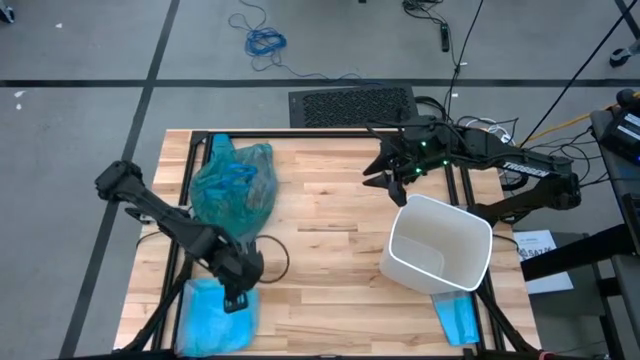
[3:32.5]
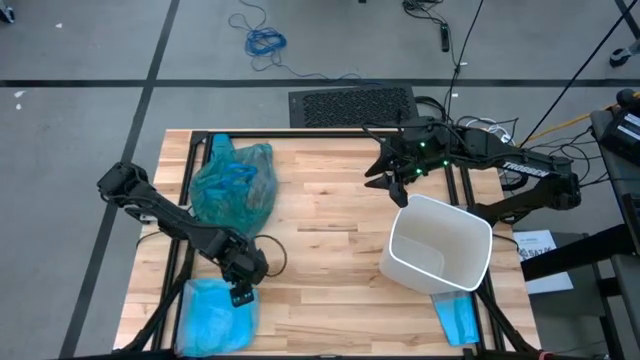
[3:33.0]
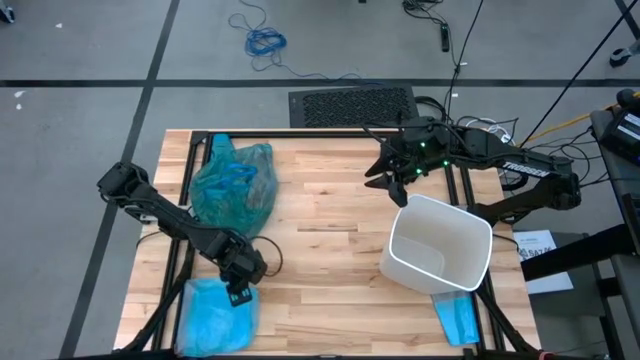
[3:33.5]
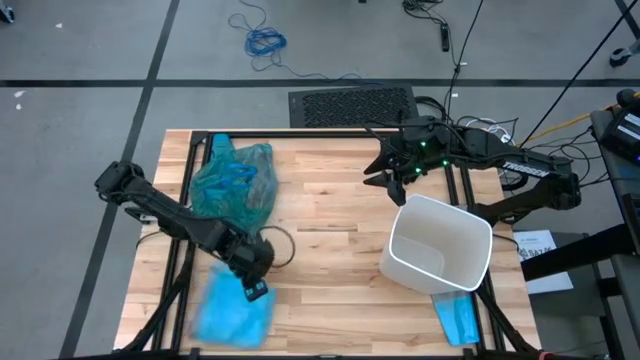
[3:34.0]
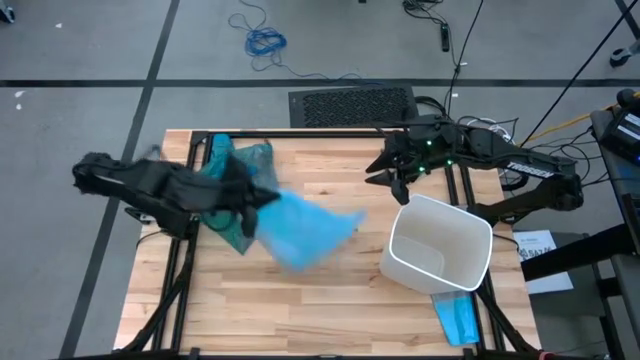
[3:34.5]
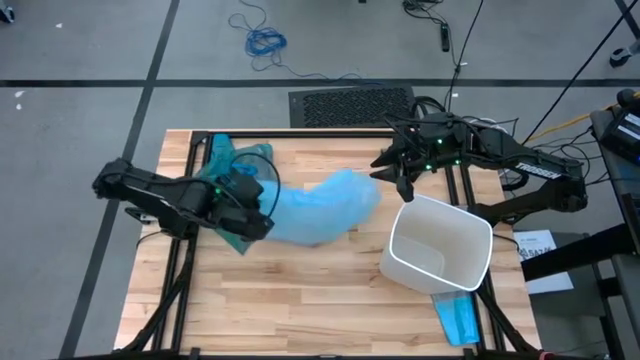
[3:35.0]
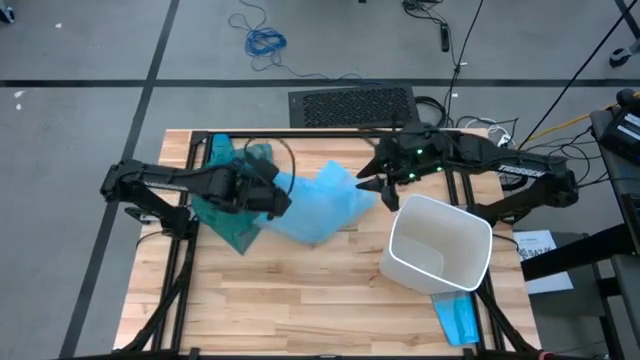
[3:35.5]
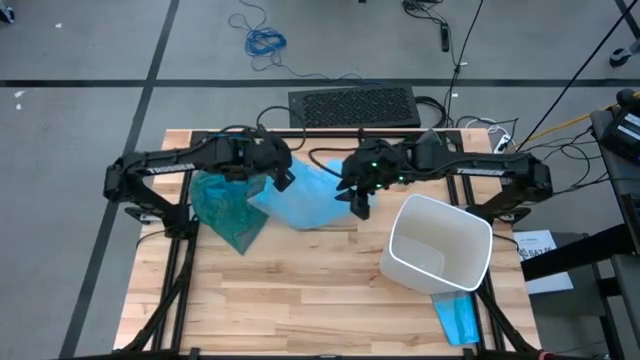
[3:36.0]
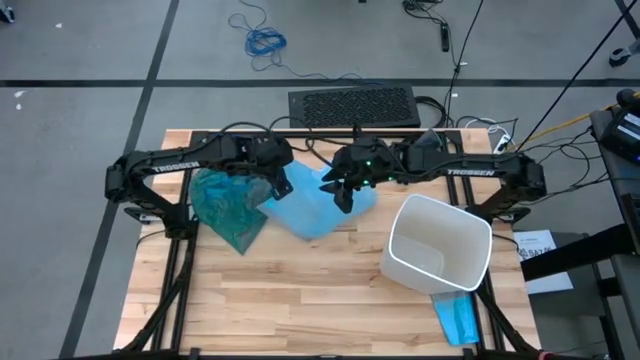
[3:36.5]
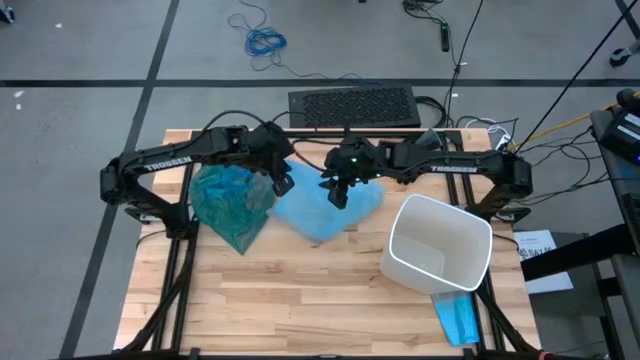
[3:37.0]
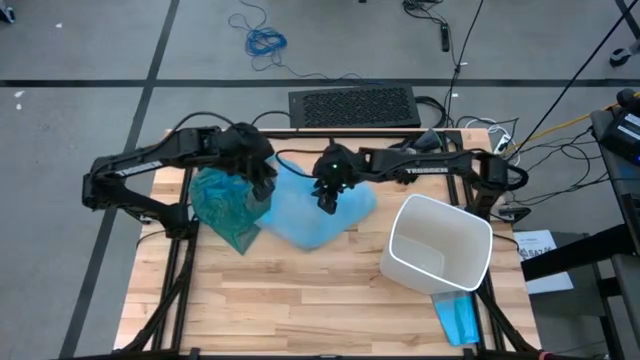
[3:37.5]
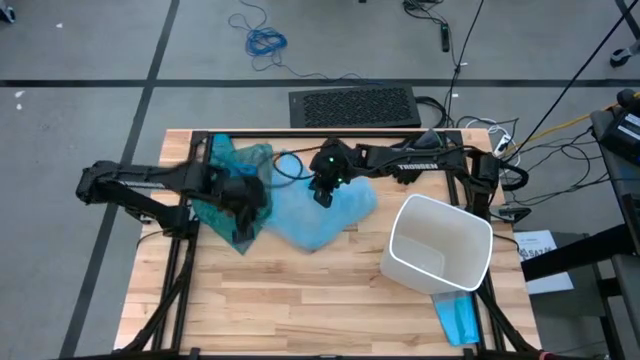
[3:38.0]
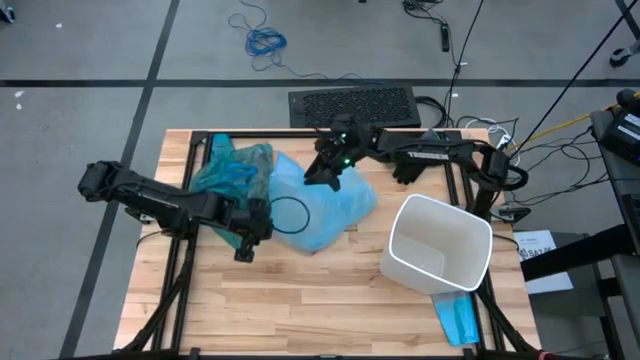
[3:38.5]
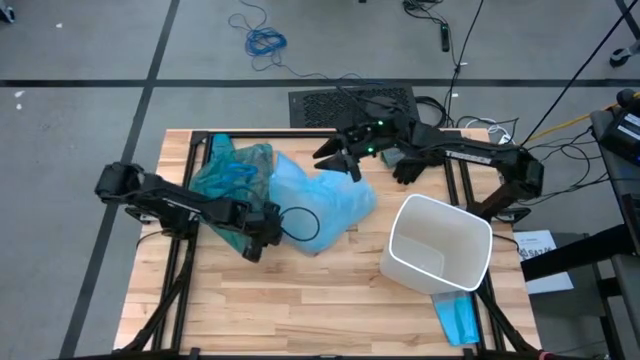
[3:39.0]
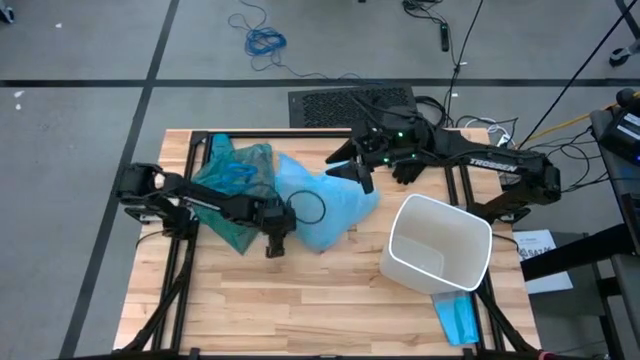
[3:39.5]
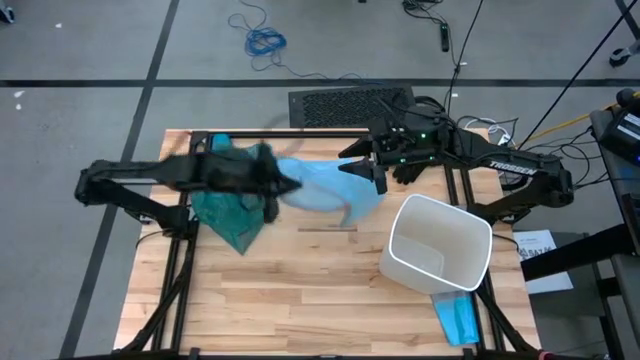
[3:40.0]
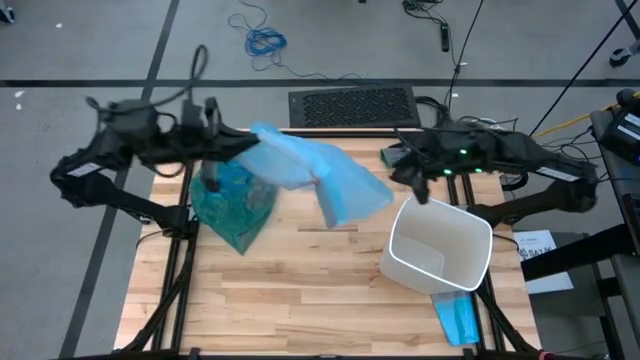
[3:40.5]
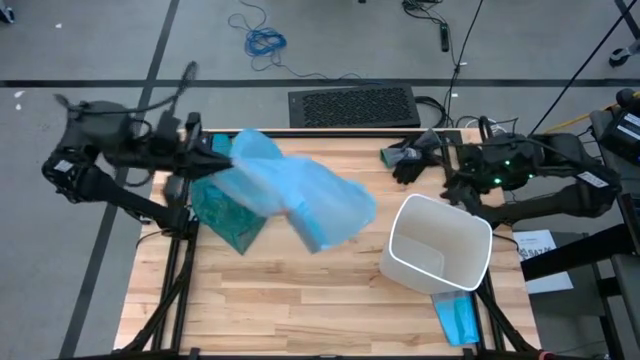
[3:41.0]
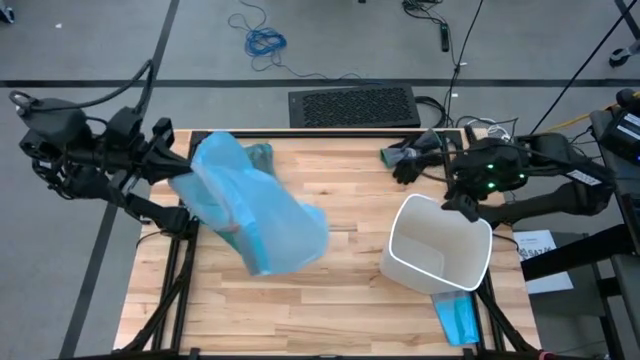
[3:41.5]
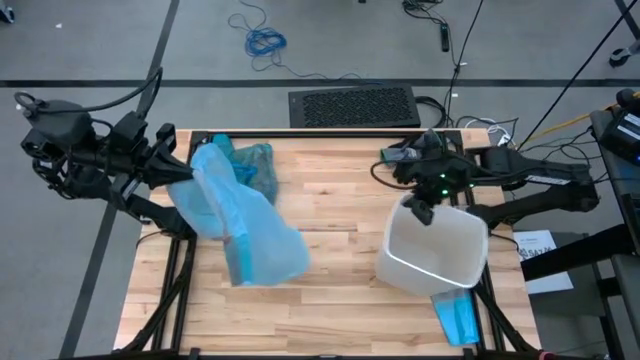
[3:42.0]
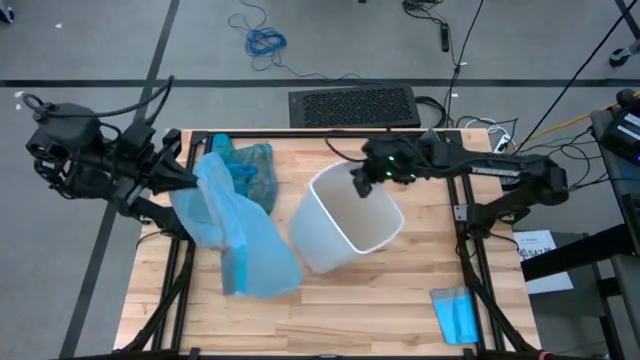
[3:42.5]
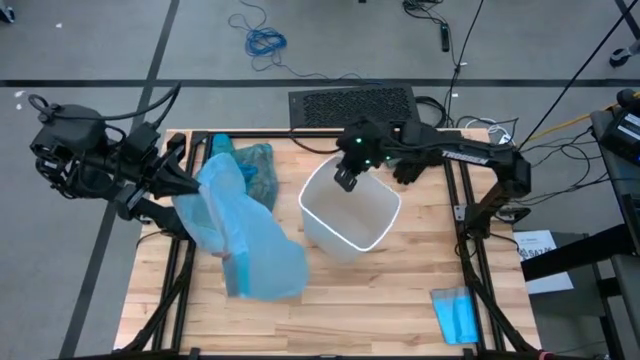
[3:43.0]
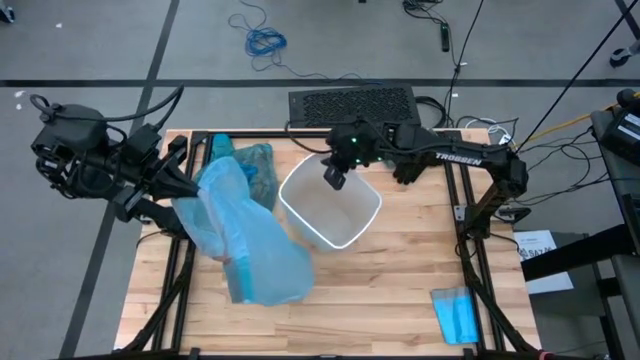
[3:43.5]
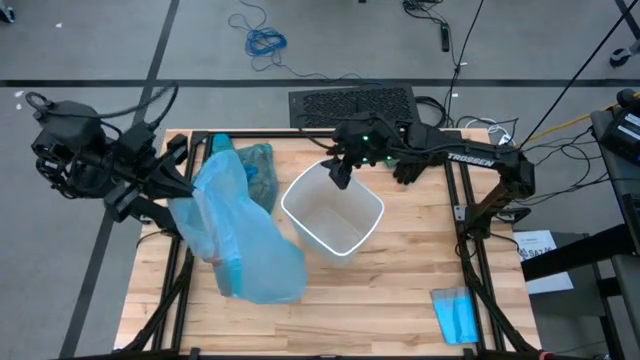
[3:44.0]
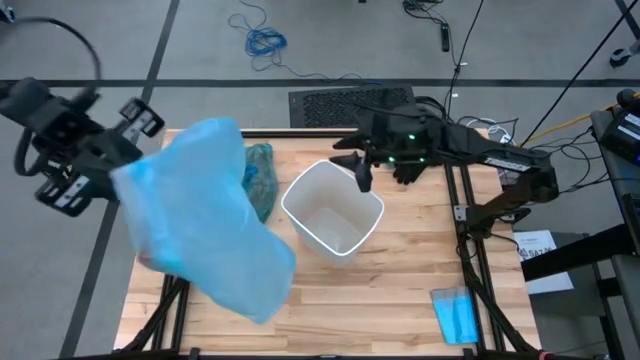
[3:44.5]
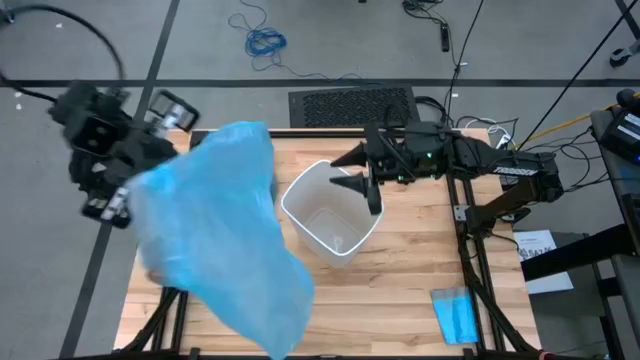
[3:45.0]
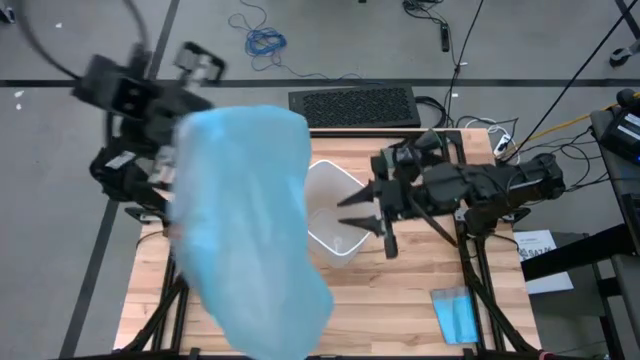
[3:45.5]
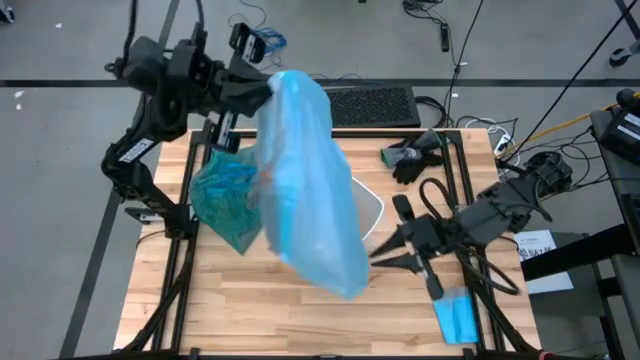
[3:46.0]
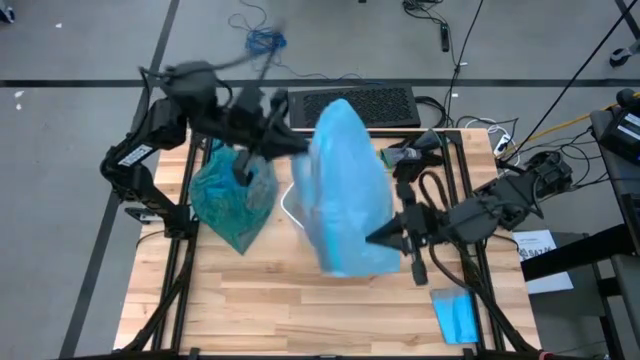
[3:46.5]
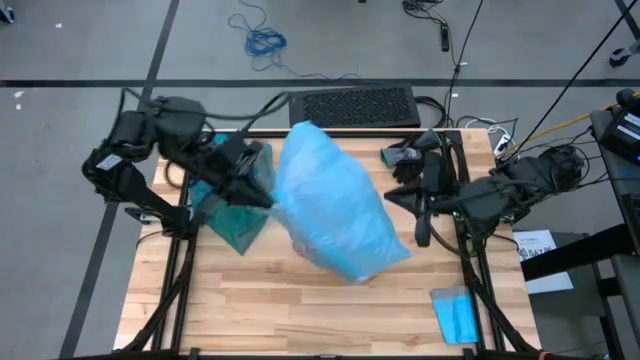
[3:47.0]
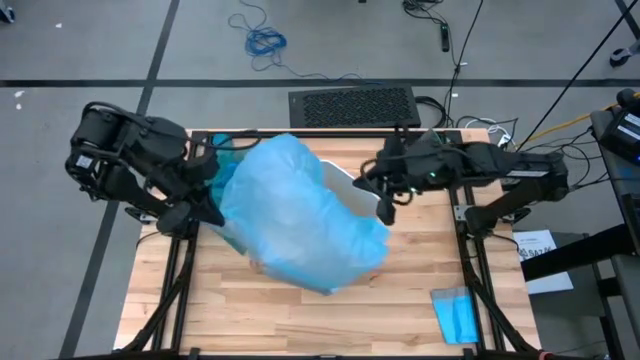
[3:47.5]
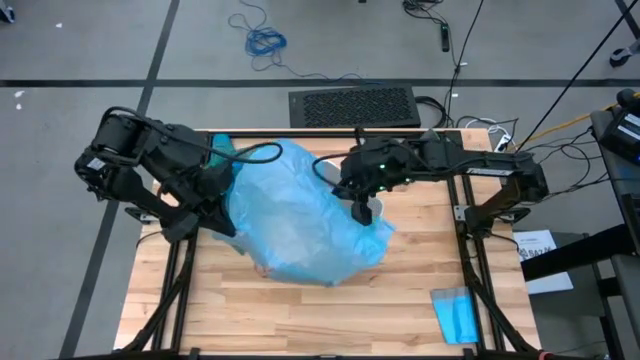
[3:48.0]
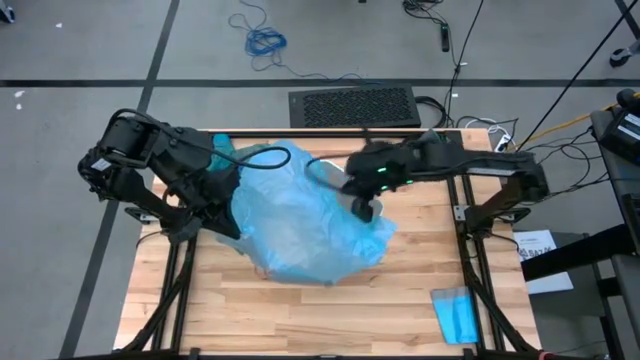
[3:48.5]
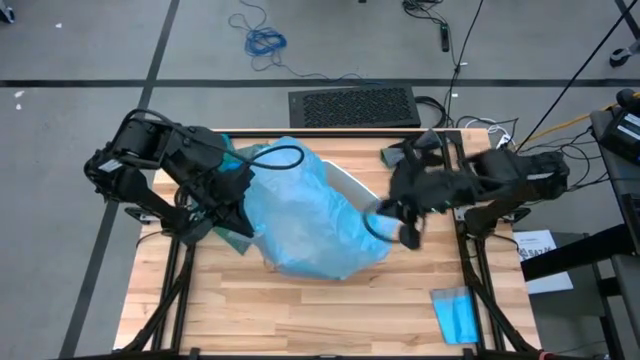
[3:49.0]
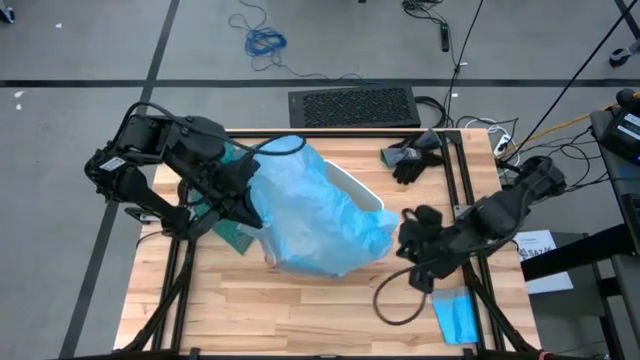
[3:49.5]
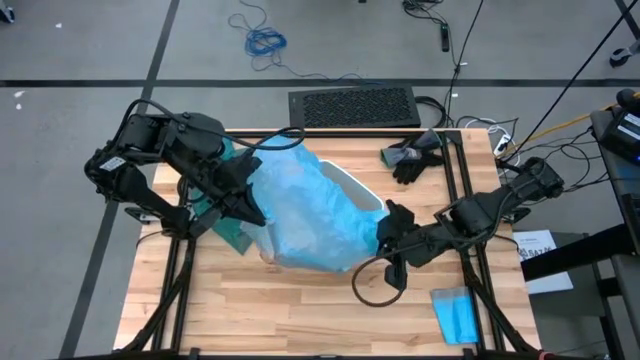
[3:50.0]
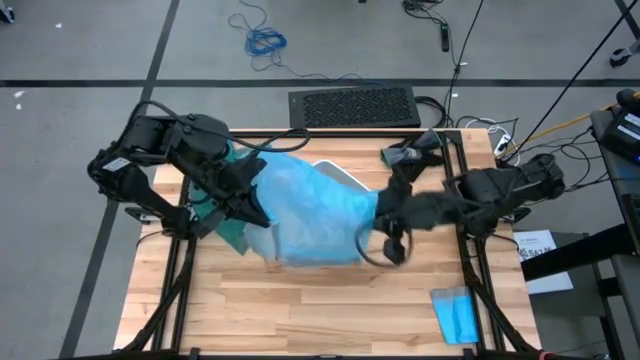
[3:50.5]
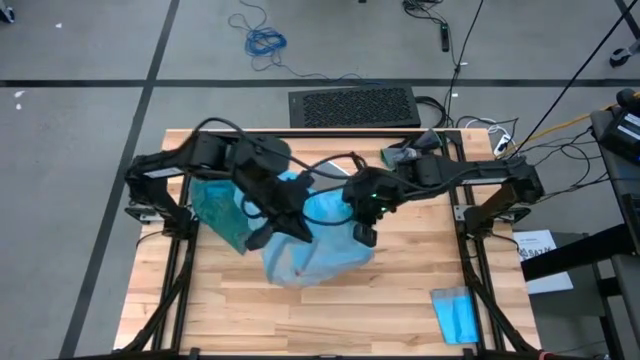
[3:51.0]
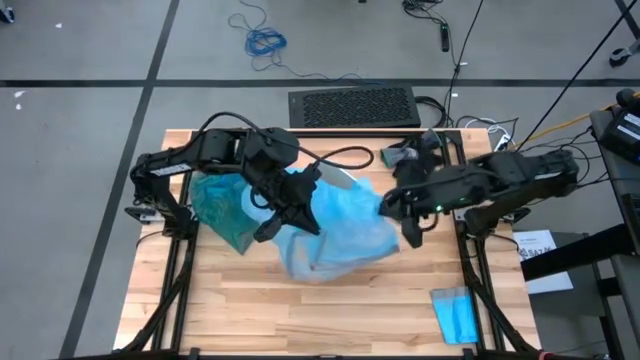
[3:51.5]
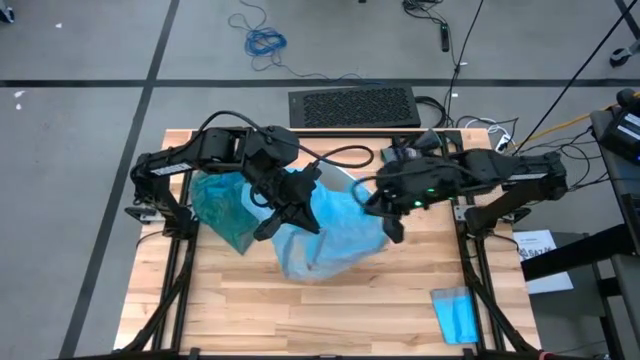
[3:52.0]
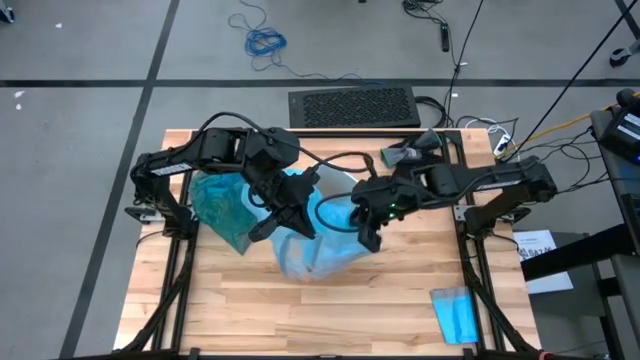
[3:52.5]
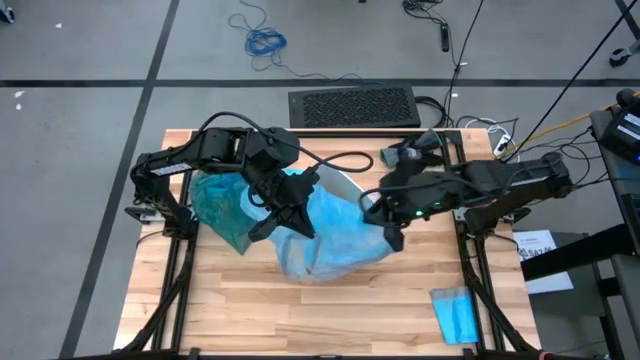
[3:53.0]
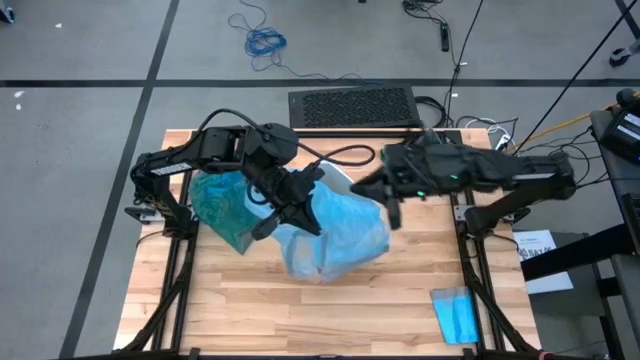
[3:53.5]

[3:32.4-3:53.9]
Task: place trash/remove bag and relplace
Insert the new blue trash bag into the trash bin
